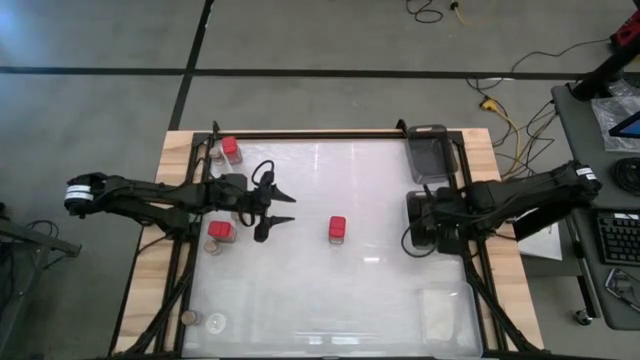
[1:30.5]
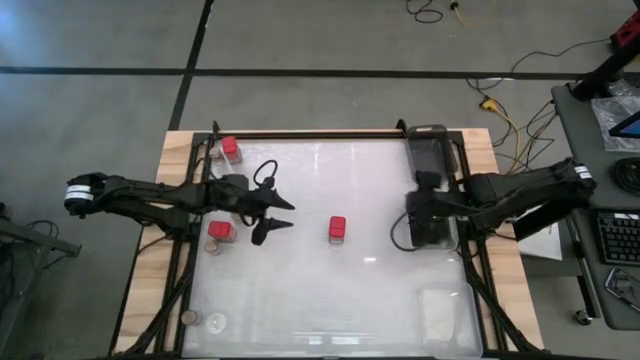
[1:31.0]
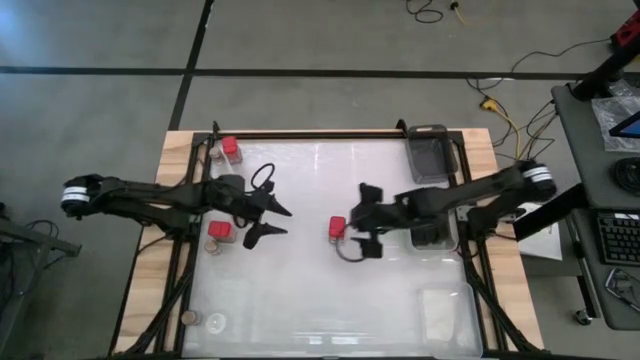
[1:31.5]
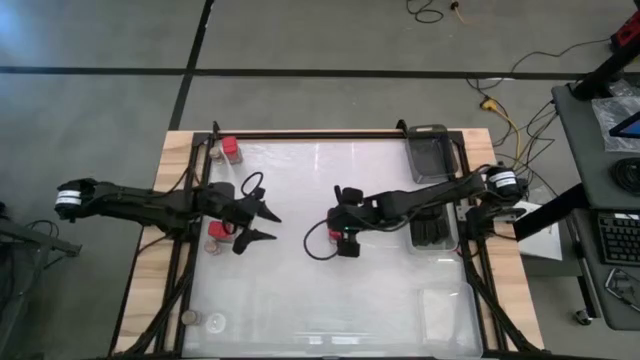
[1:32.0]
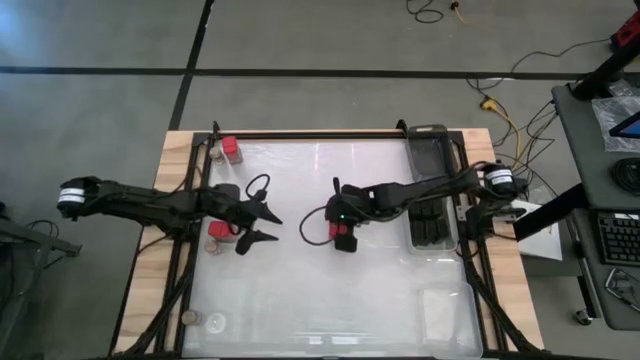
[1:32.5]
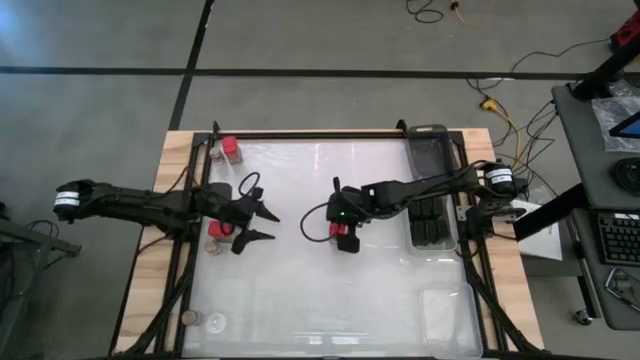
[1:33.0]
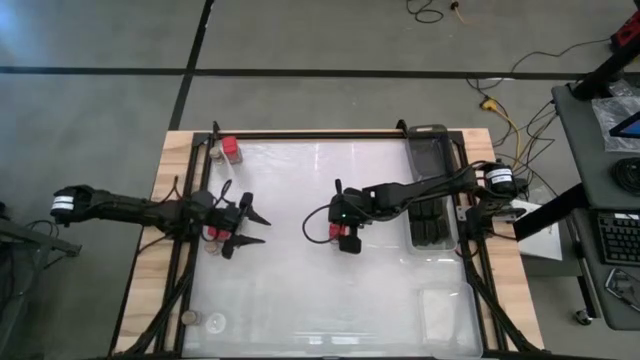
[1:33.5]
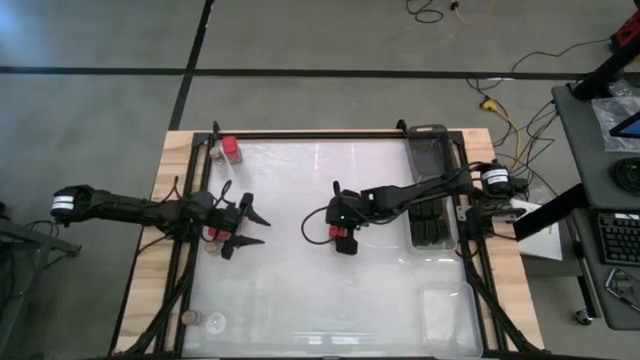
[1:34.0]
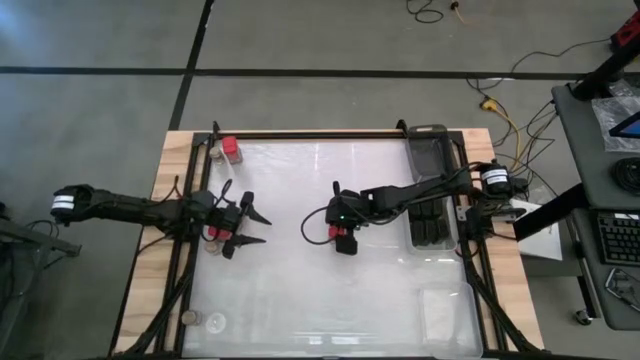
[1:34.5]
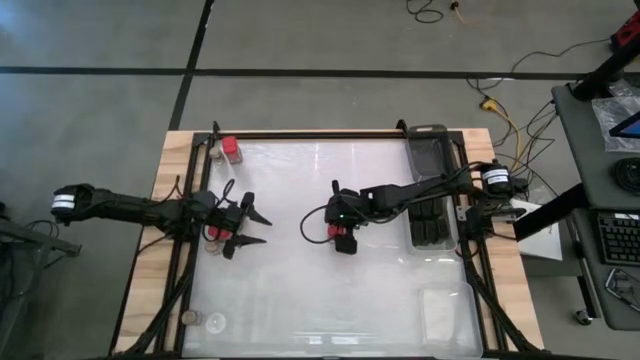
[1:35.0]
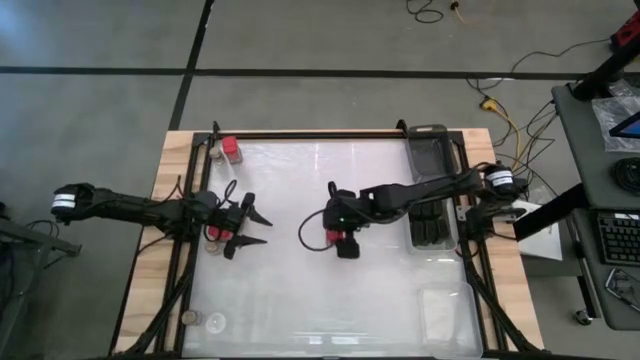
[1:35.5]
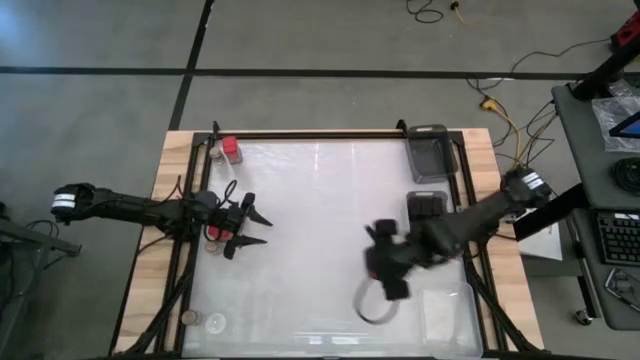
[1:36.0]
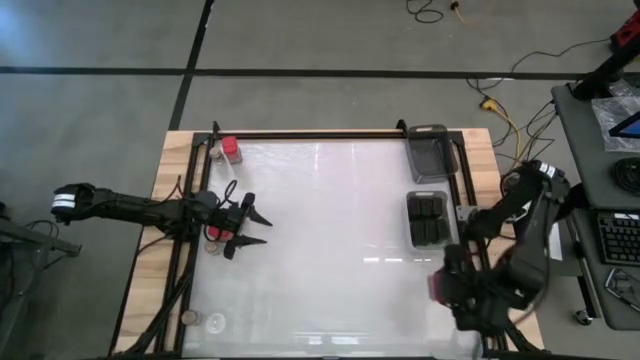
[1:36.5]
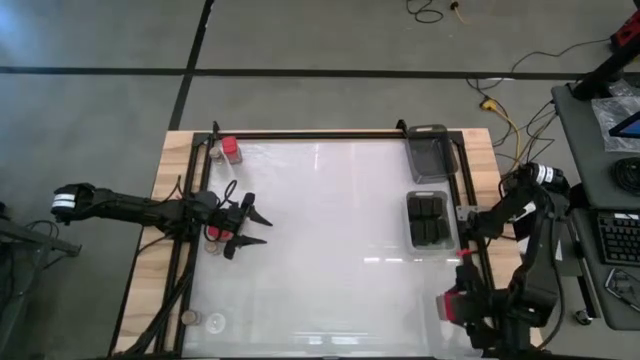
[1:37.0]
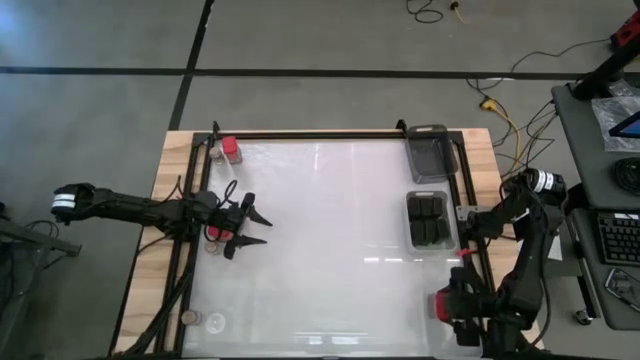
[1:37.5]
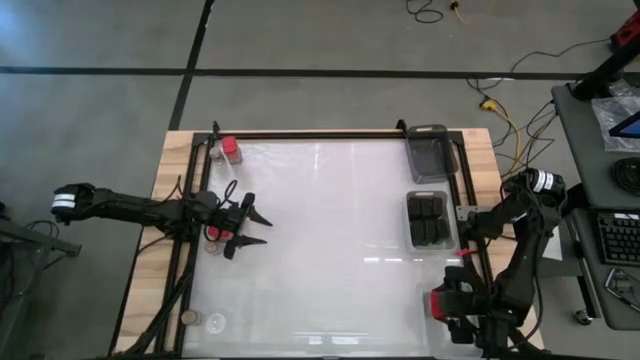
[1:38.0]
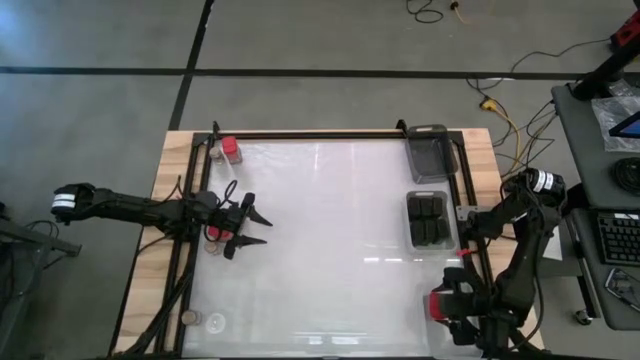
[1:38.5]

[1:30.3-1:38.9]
Task: Sort spices by type
Put the red seasoning can into the transparent bin

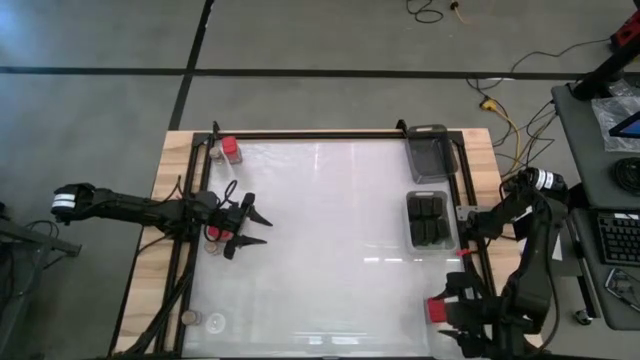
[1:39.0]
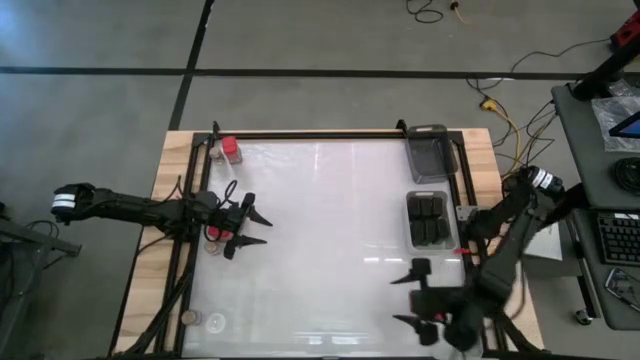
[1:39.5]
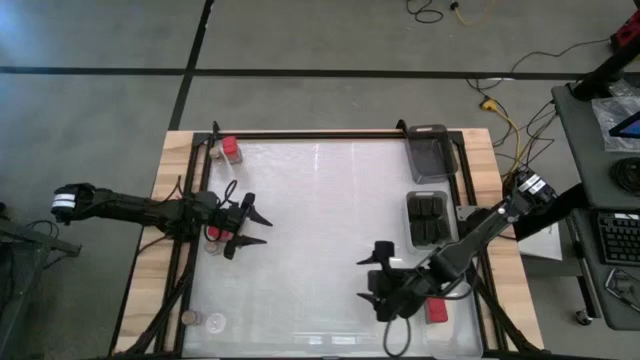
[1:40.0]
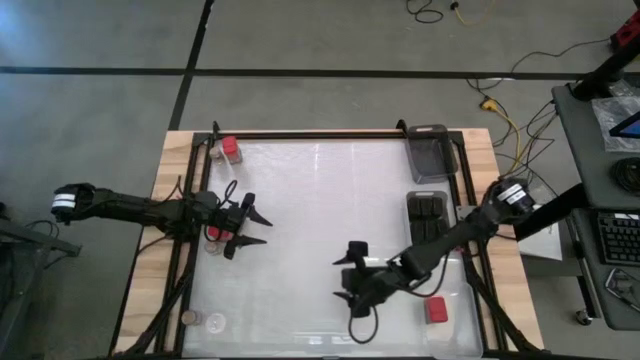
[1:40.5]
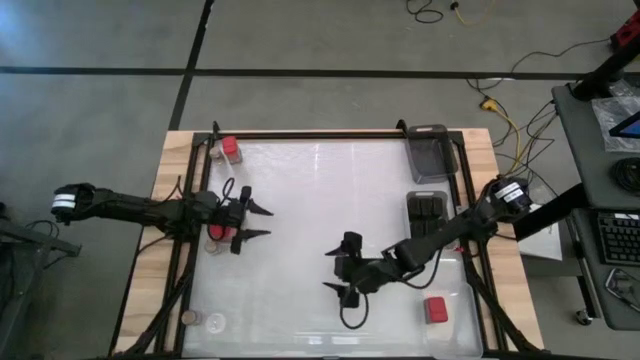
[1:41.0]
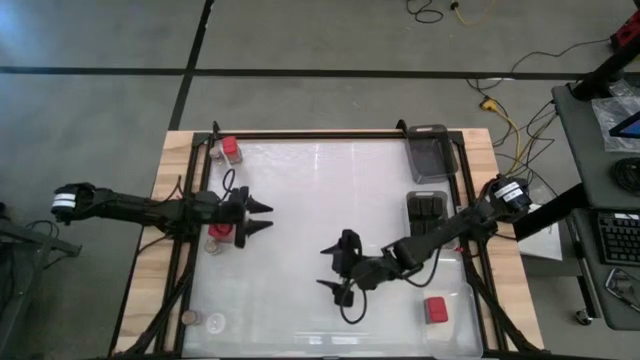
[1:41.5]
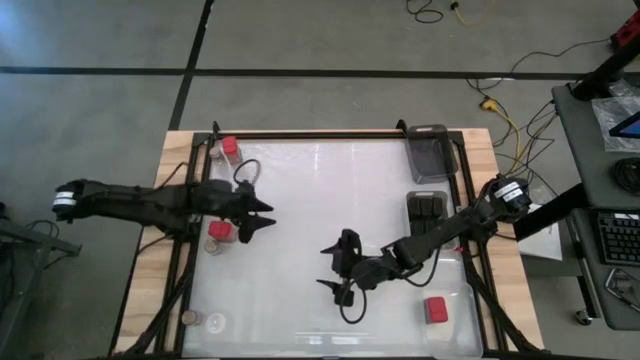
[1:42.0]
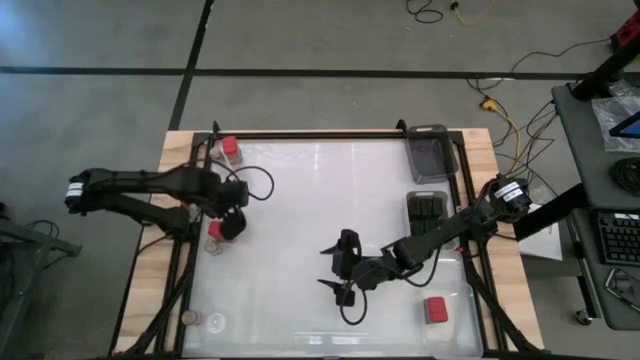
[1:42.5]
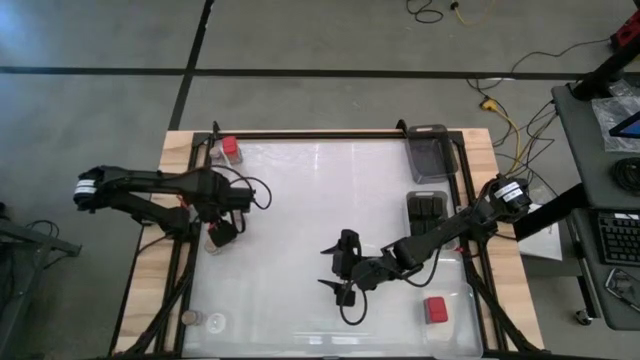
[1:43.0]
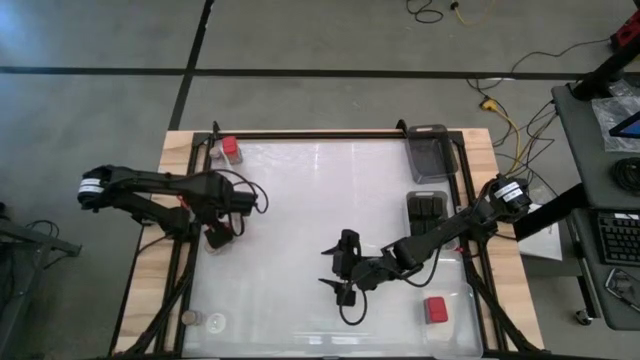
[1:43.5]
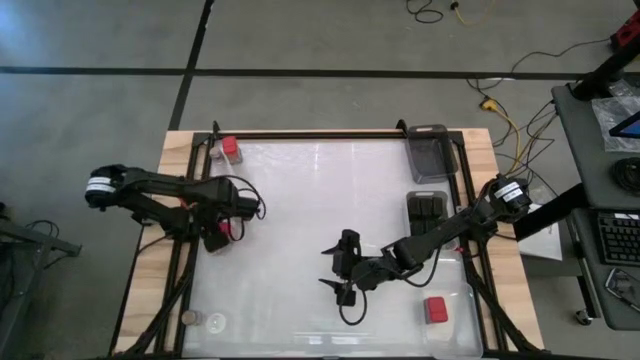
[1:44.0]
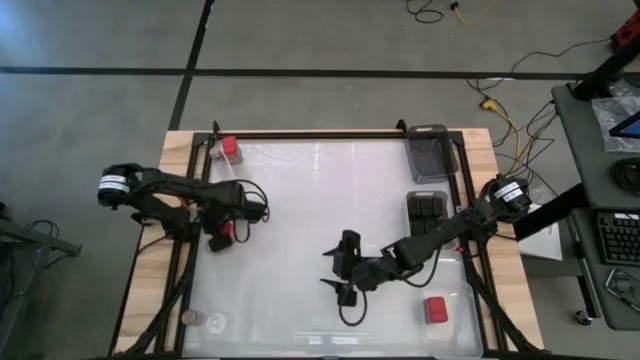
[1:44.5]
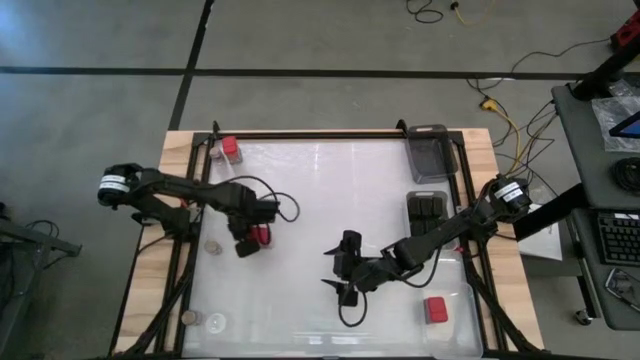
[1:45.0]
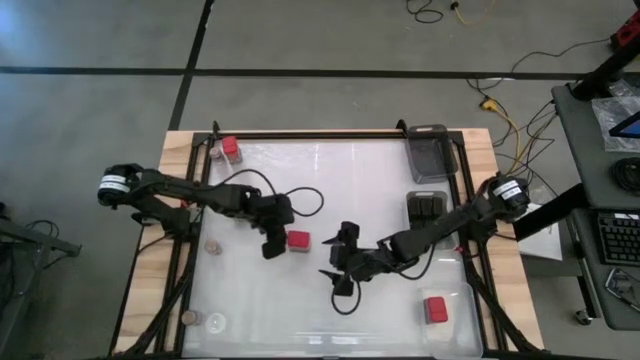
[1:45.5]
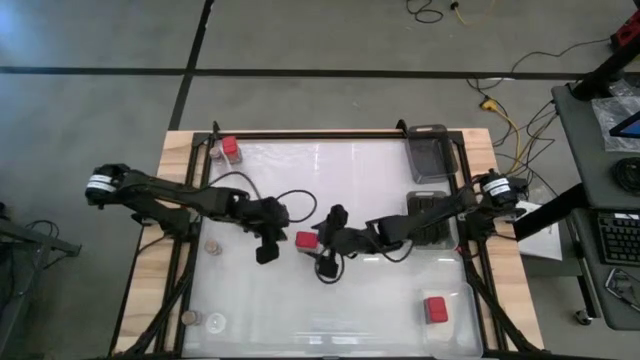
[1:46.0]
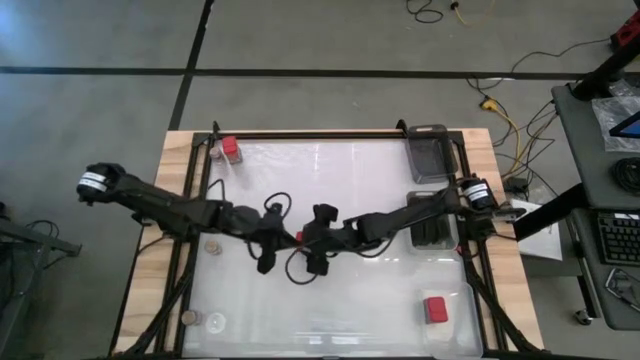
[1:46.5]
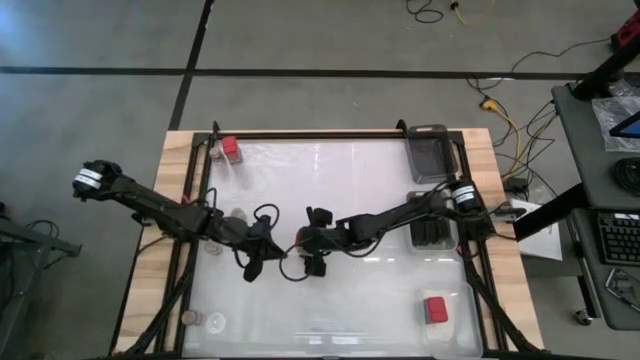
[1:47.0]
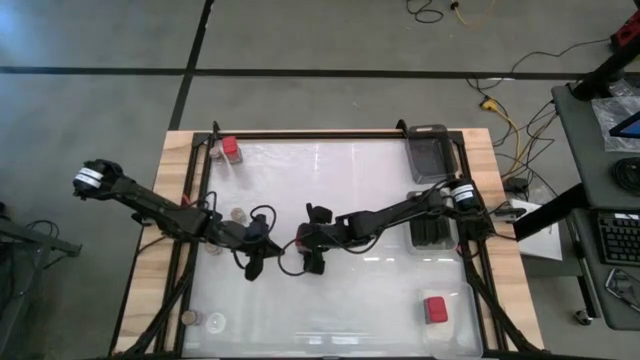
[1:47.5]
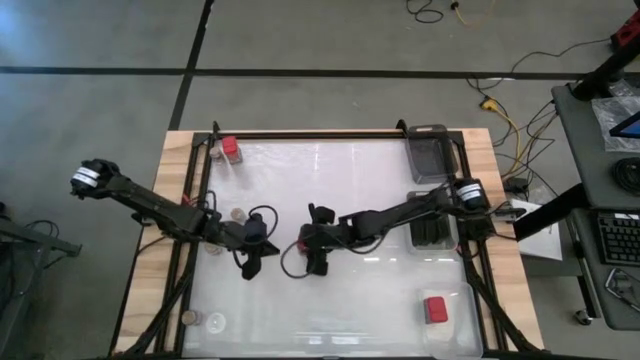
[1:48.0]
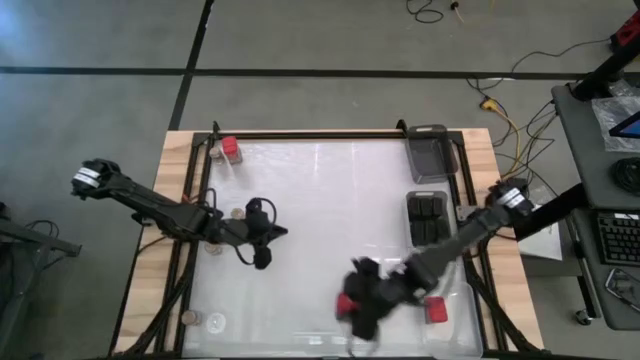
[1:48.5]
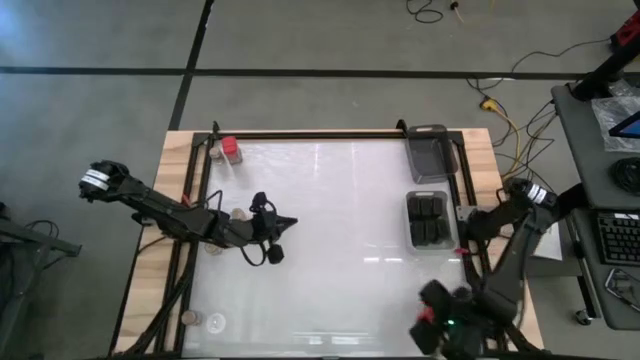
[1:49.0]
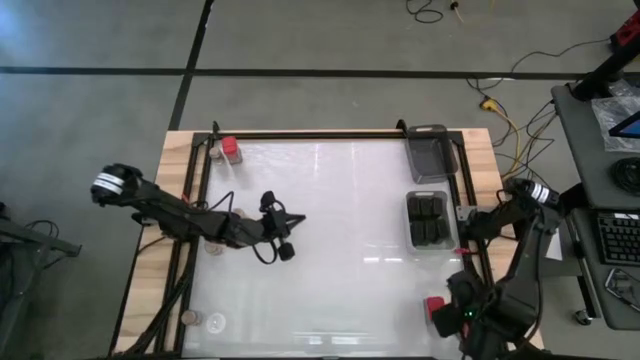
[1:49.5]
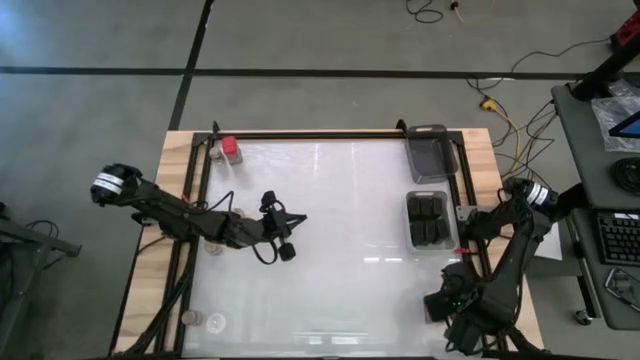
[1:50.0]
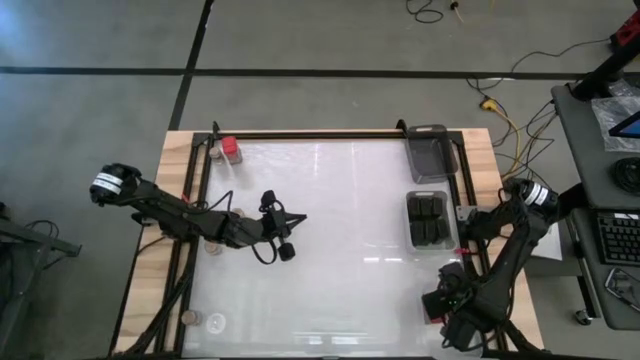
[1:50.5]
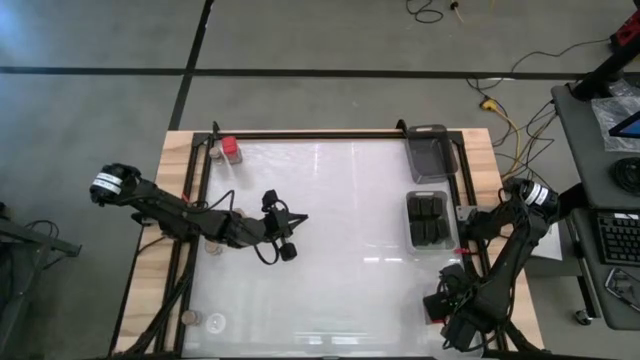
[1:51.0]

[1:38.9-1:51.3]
Put the red seasoning can into the transparent bin
